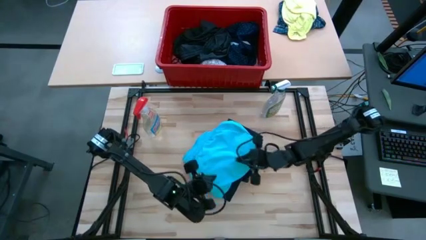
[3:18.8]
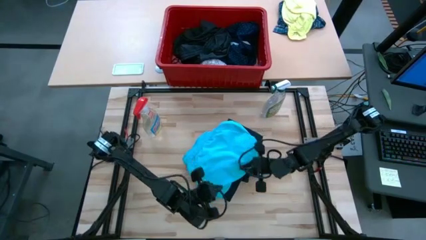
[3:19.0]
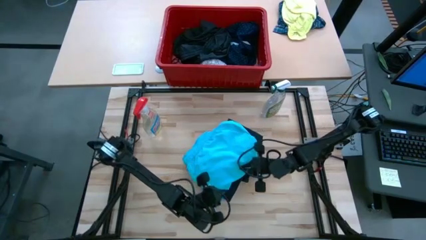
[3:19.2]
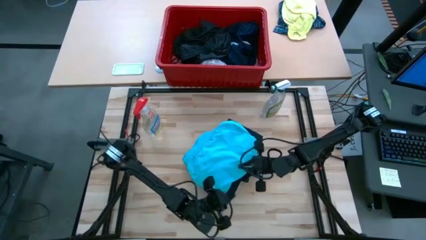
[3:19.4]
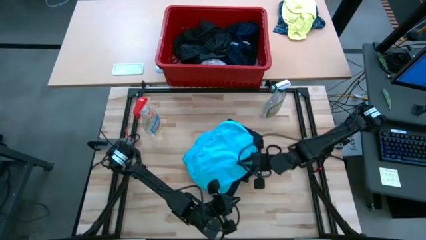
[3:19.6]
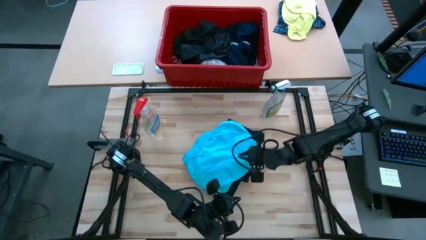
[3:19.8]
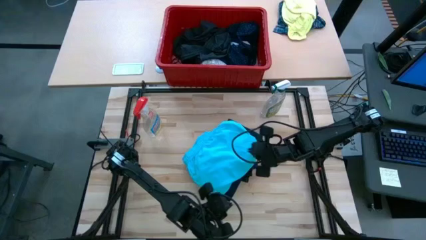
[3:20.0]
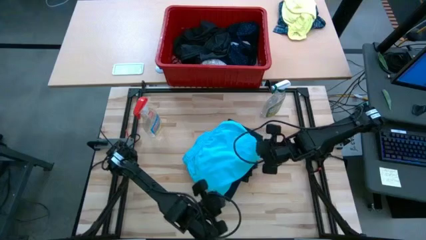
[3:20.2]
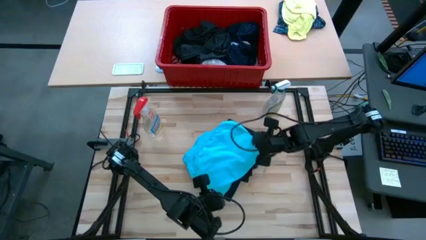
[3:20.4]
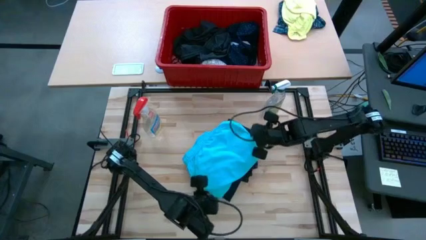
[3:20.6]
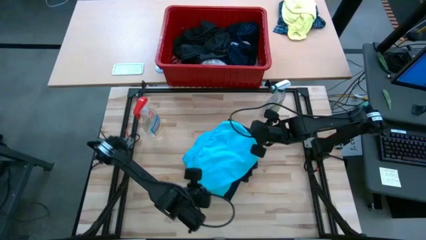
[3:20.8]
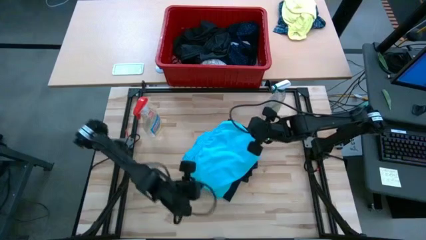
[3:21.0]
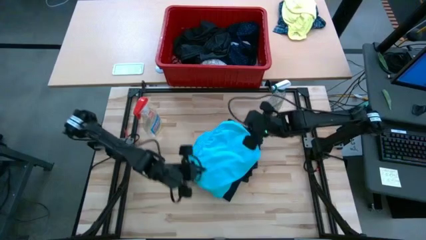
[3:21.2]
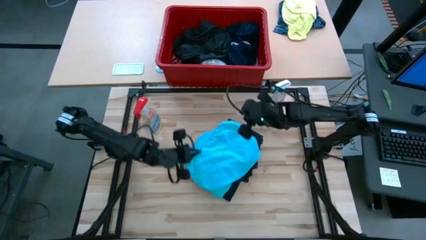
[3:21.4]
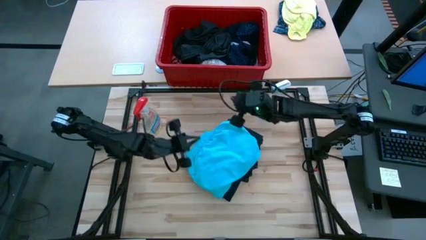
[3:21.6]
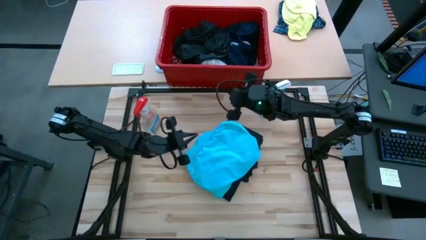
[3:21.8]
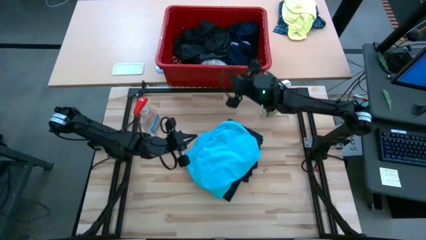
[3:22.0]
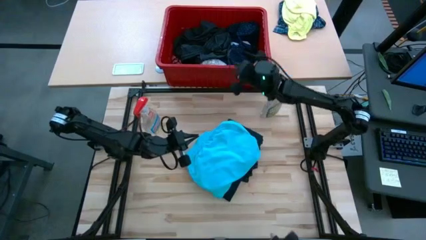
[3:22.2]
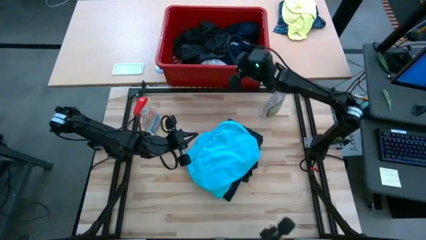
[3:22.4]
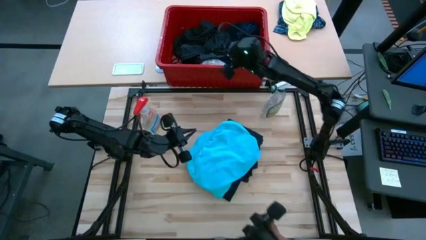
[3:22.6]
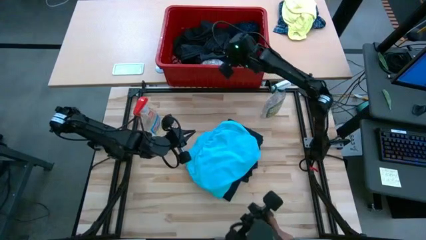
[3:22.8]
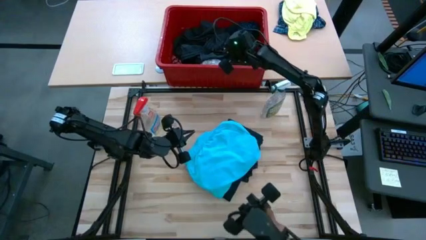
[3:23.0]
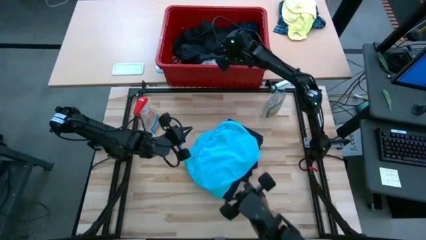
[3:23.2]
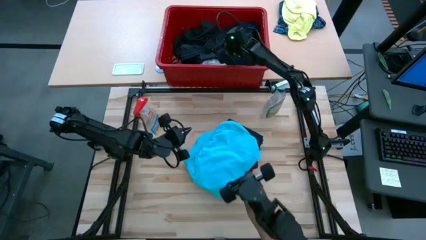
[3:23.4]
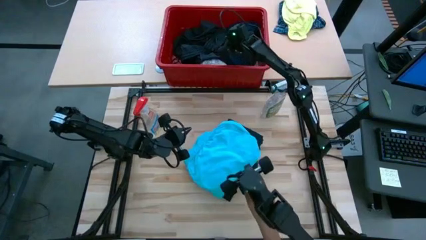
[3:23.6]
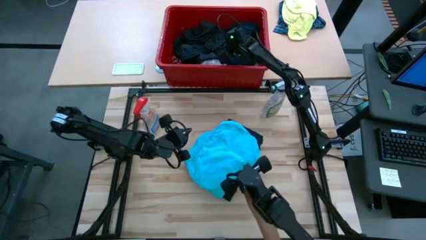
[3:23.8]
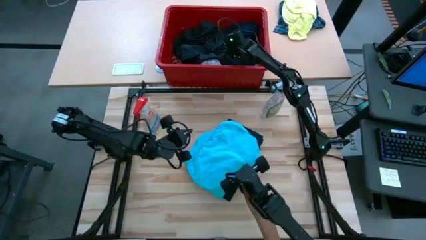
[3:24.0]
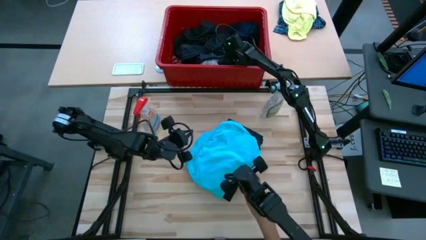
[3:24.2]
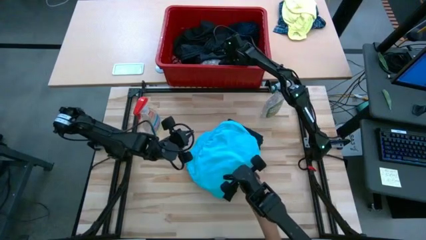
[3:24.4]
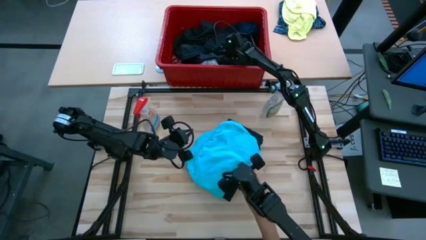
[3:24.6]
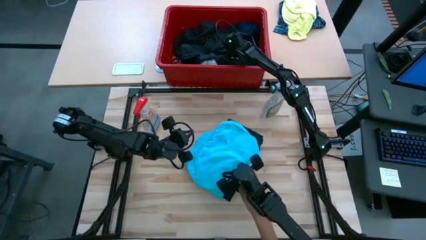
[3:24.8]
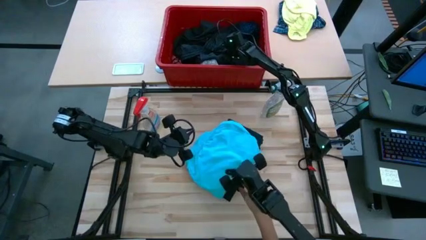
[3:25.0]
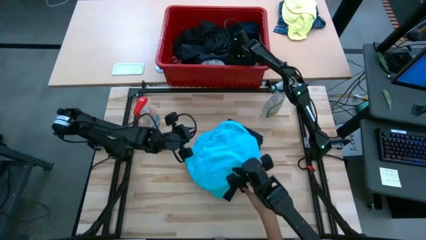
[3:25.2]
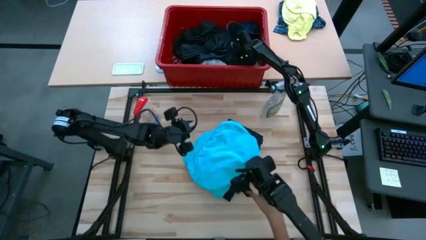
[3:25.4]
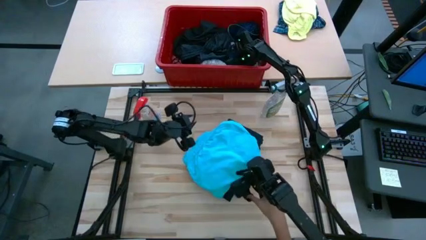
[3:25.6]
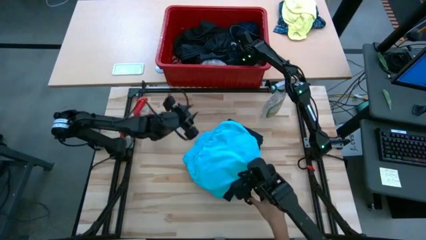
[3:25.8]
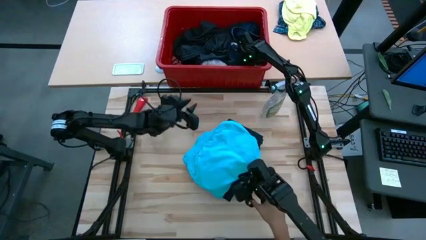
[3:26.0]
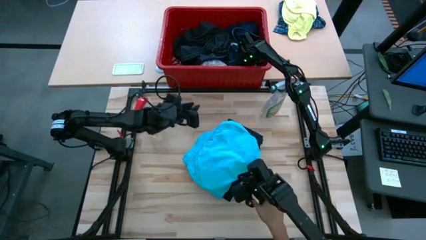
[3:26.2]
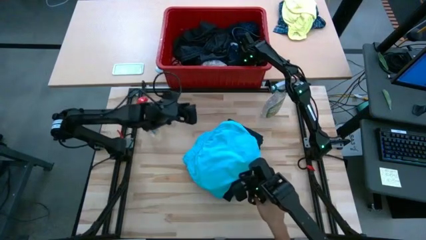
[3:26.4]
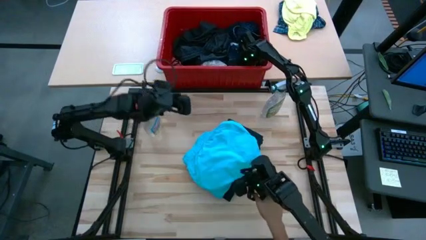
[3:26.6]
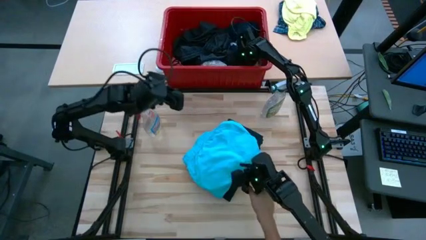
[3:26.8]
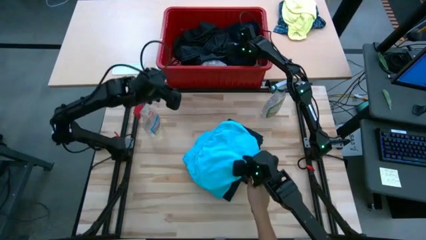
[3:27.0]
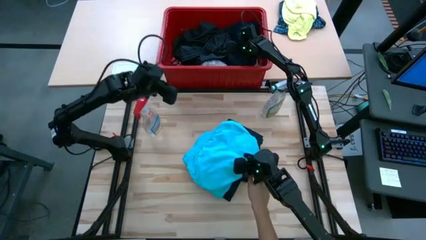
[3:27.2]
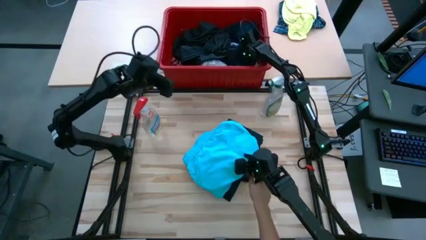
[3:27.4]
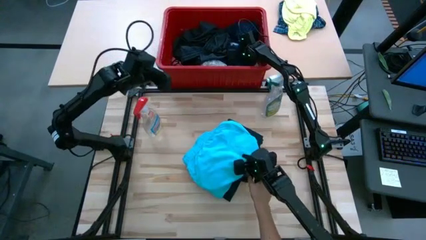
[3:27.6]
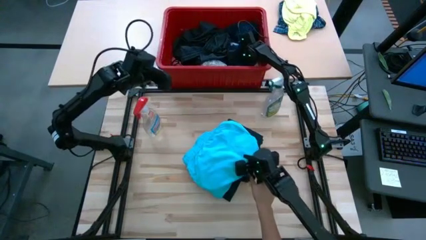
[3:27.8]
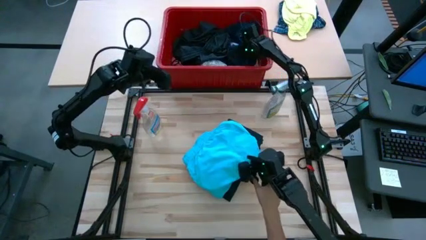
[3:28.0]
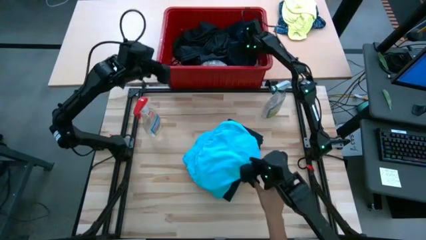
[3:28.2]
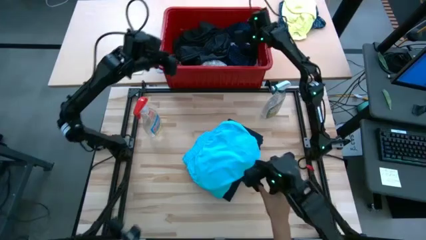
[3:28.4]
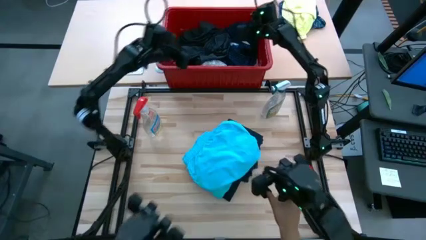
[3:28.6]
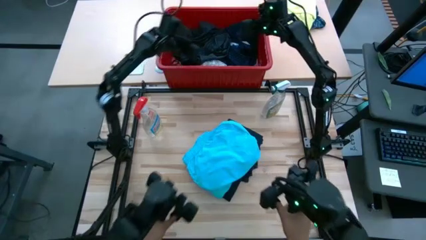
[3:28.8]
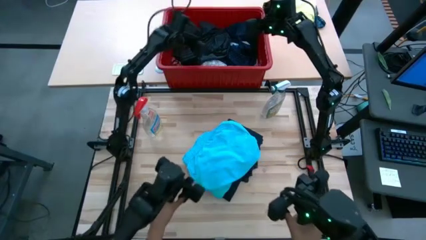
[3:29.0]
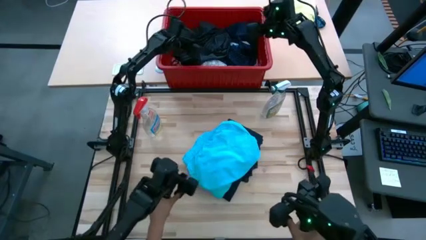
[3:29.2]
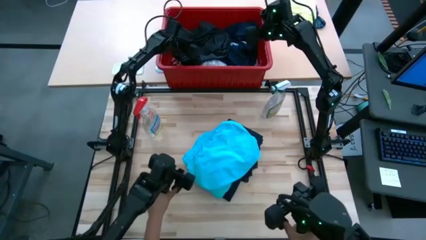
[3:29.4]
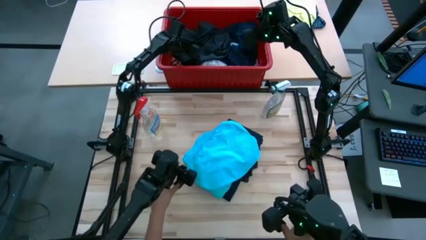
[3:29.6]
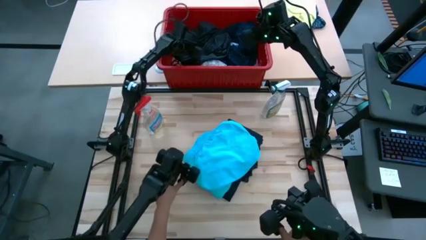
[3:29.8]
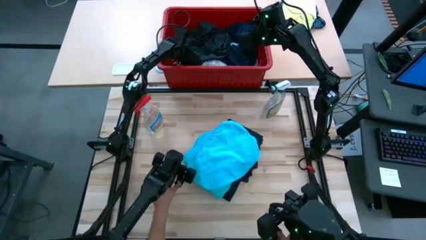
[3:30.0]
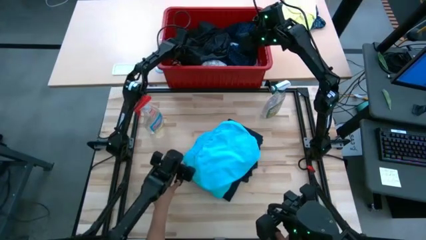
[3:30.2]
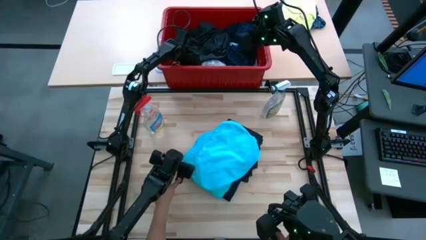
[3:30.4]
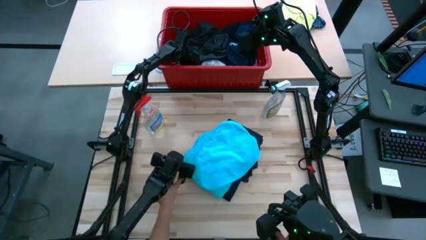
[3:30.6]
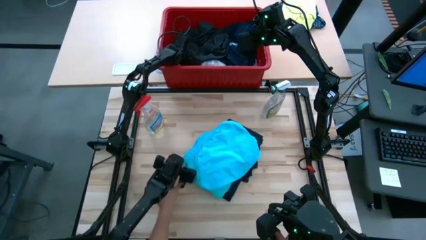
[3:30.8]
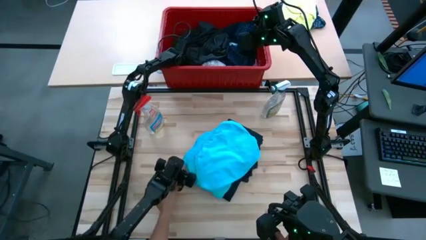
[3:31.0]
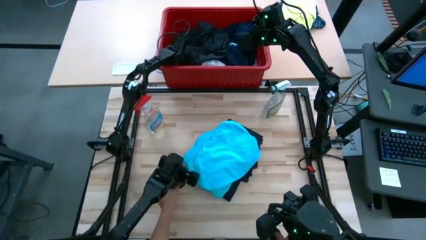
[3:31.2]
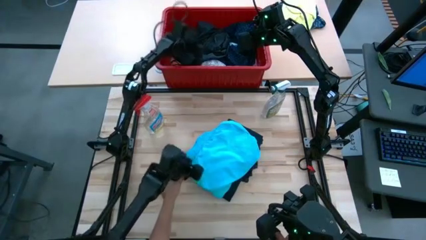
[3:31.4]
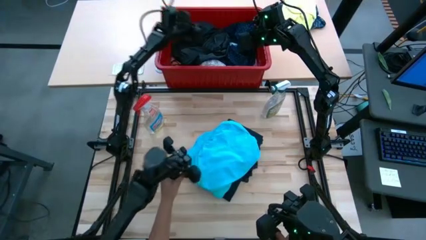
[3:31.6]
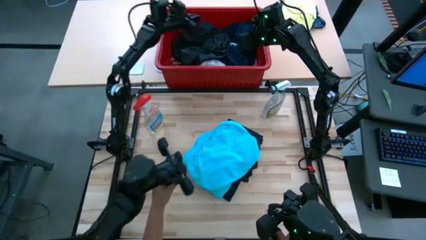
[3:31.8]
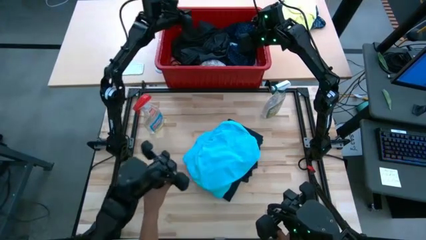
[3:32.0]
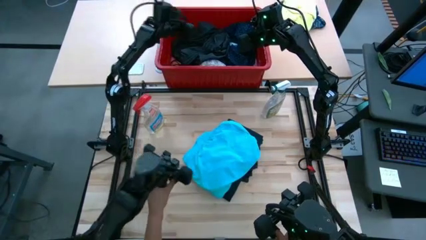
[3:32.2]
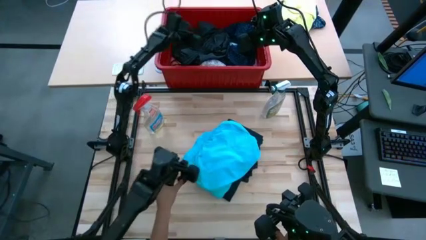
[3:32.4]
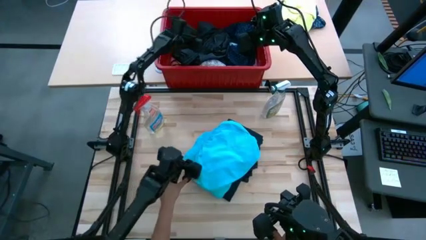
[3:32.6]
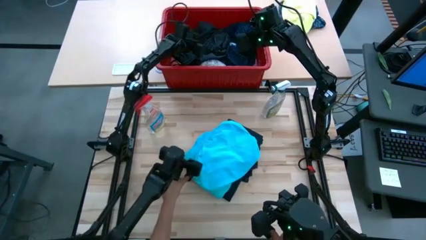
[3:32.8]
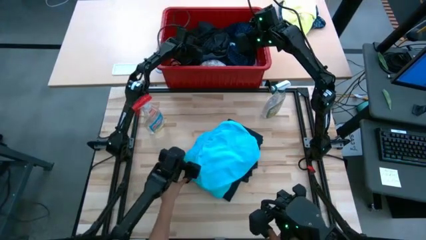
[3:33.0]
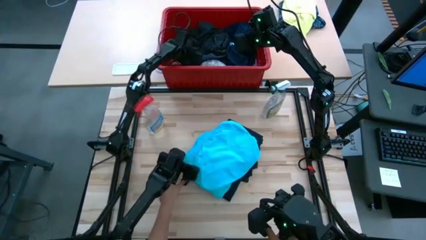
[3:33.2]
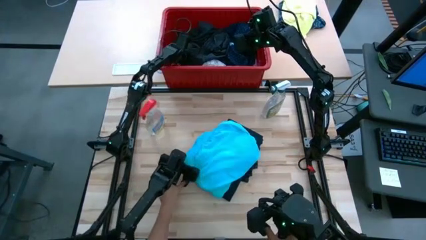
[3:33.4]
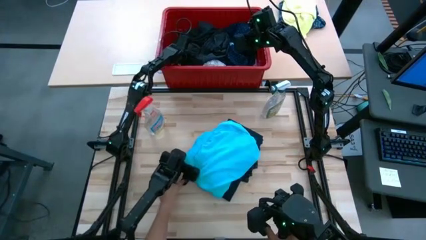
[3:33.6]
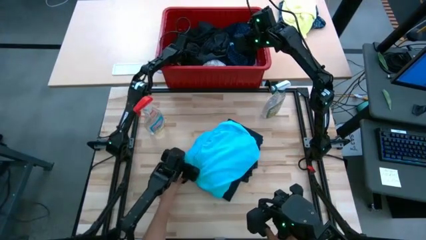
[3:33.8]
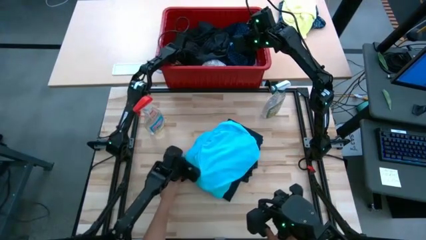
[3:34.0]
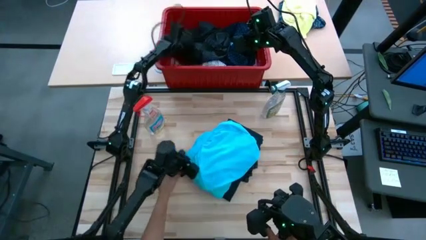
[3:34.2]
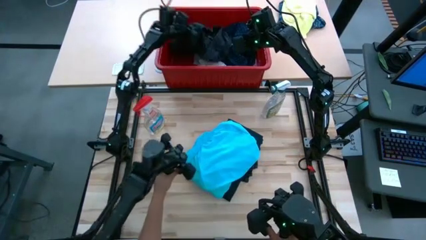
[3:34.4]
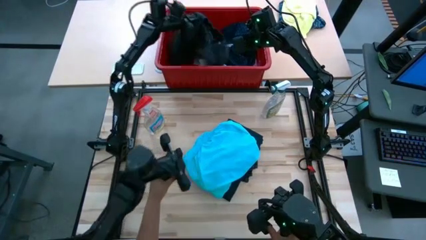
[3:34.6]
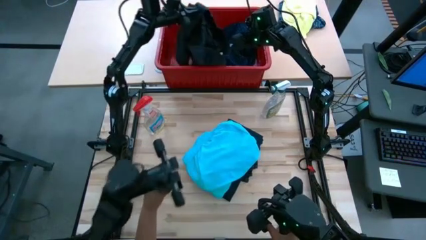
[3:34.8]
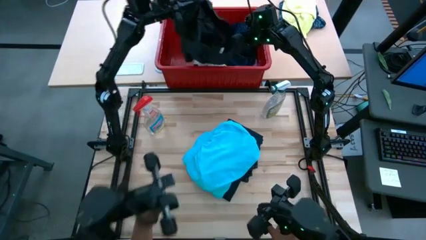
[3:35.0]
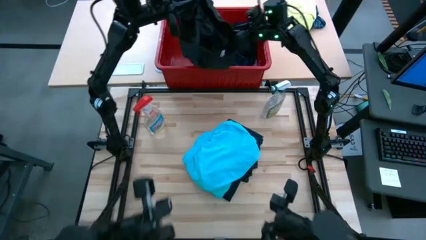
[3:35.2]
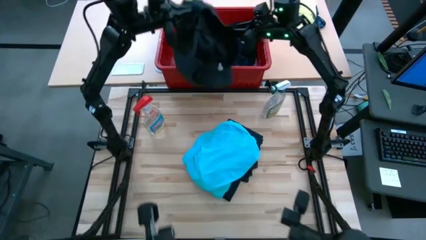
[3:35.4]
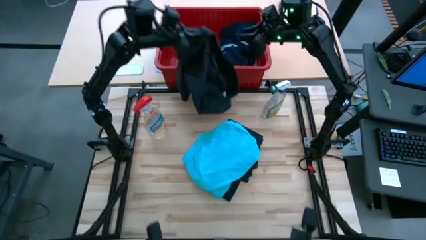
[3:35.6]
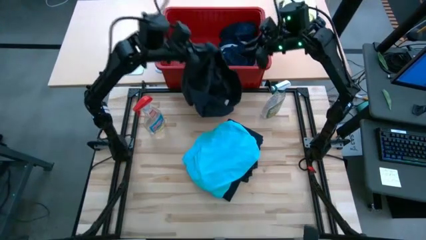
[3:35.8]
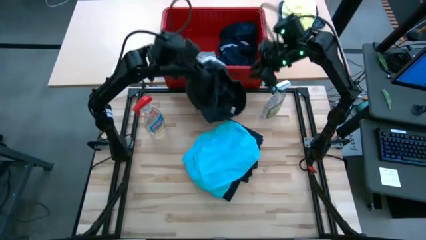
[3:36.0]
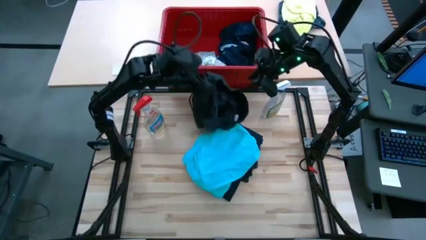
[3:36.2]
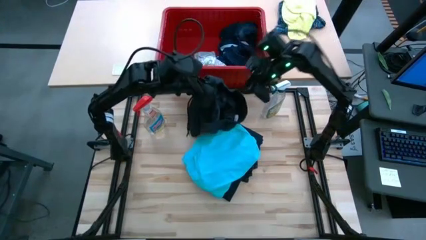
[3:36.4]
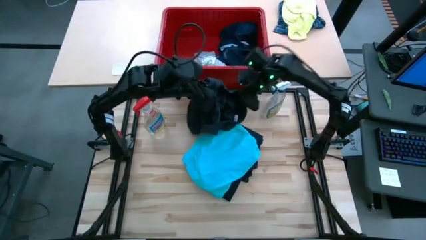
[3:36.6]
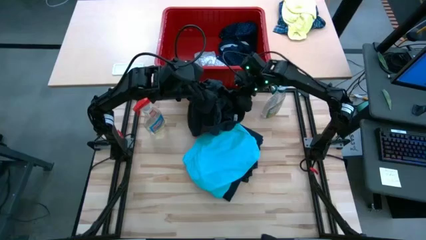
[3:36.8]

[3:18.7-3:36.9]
Task: Fold Laundry from Bin
Fold the black shorts
